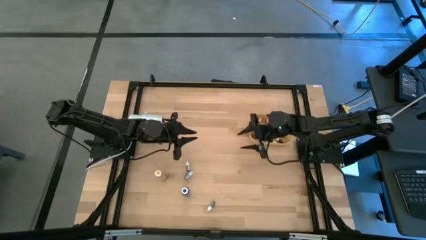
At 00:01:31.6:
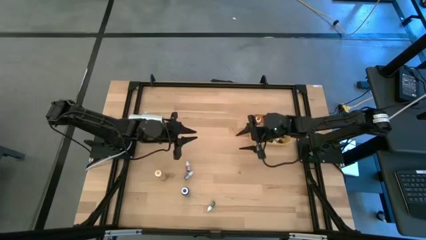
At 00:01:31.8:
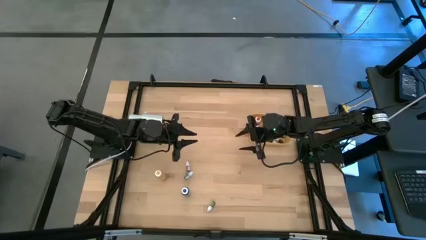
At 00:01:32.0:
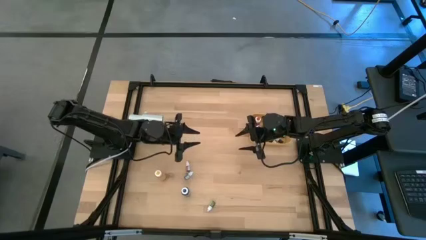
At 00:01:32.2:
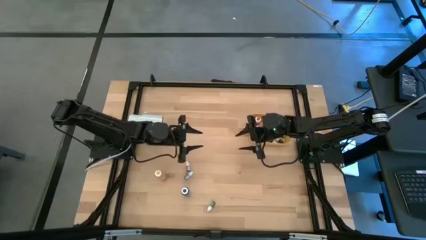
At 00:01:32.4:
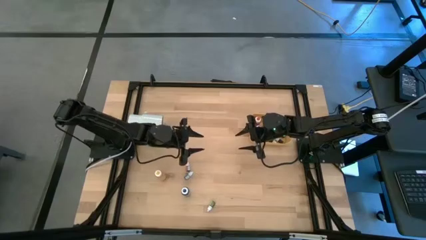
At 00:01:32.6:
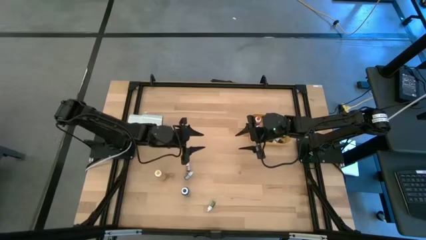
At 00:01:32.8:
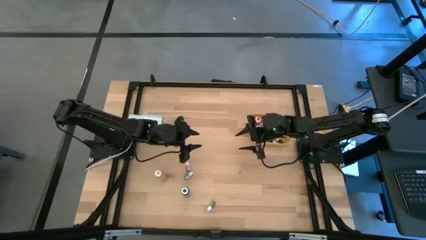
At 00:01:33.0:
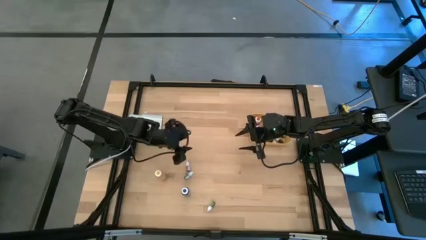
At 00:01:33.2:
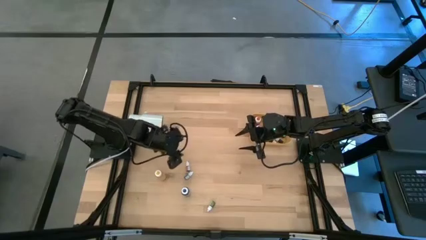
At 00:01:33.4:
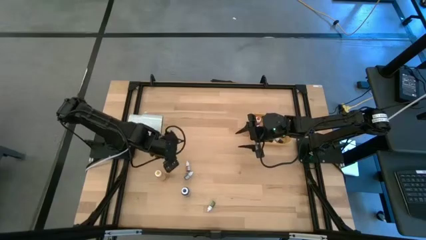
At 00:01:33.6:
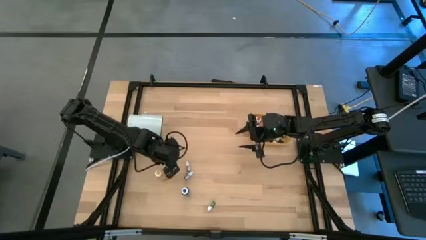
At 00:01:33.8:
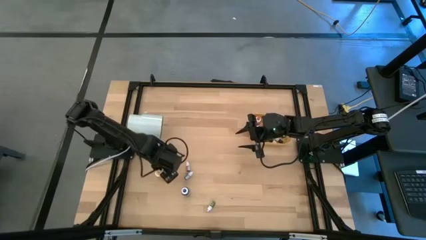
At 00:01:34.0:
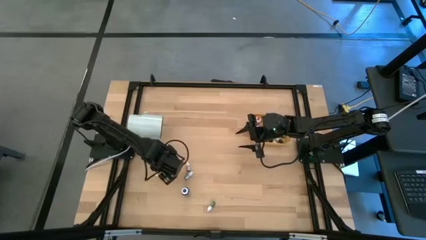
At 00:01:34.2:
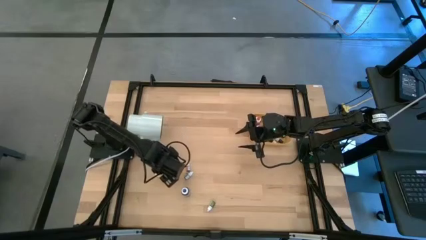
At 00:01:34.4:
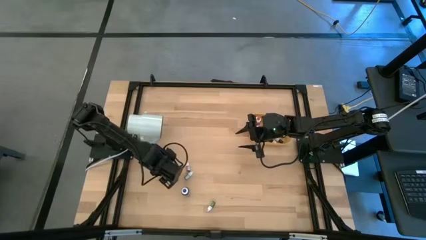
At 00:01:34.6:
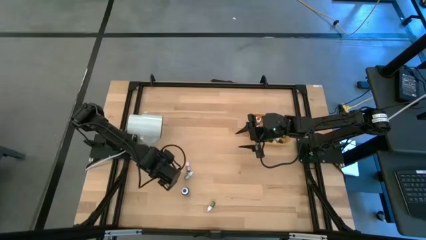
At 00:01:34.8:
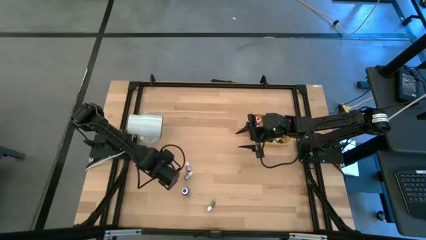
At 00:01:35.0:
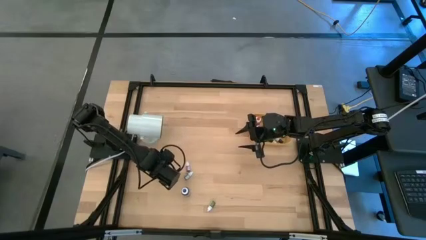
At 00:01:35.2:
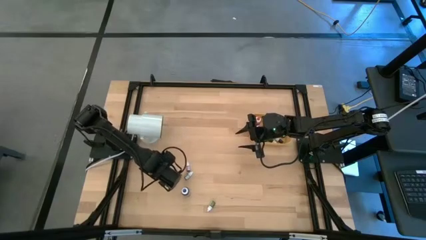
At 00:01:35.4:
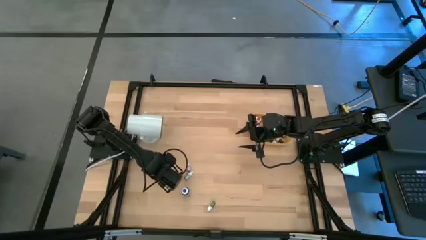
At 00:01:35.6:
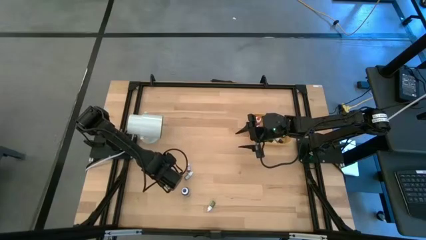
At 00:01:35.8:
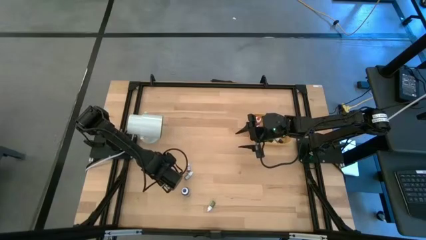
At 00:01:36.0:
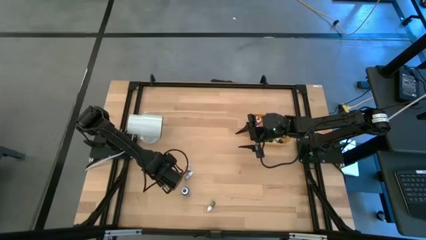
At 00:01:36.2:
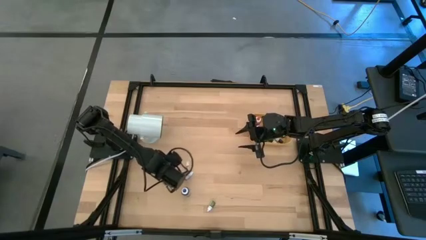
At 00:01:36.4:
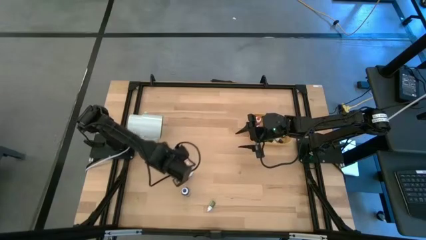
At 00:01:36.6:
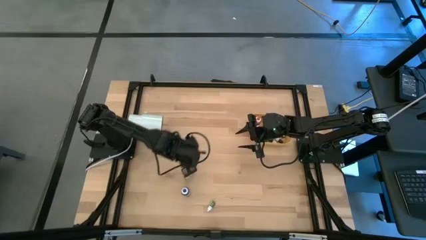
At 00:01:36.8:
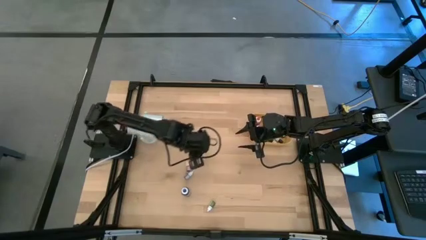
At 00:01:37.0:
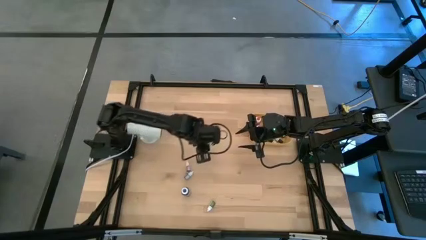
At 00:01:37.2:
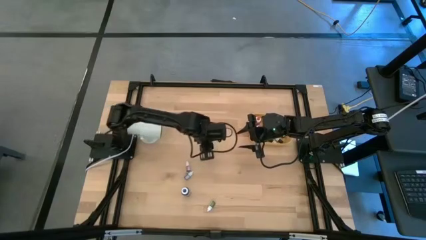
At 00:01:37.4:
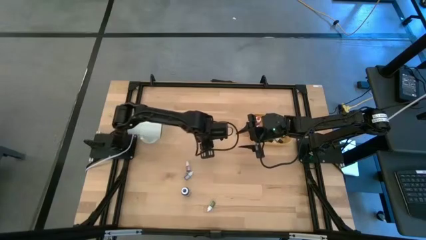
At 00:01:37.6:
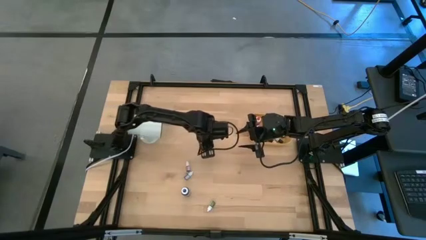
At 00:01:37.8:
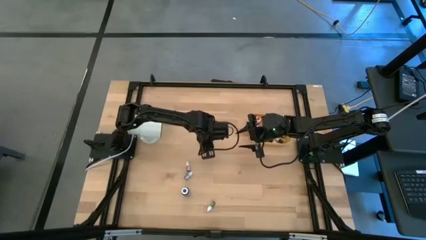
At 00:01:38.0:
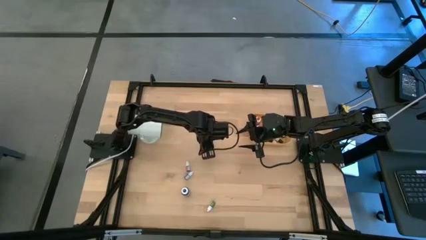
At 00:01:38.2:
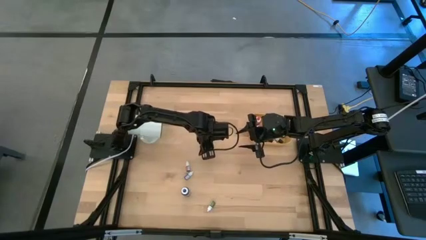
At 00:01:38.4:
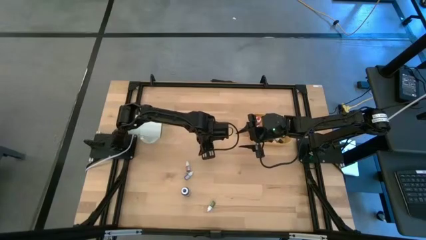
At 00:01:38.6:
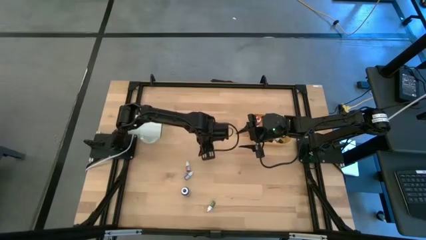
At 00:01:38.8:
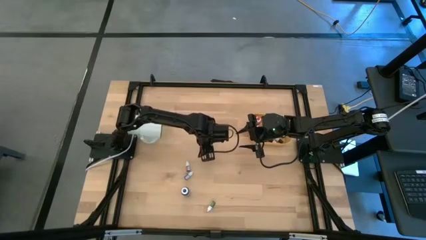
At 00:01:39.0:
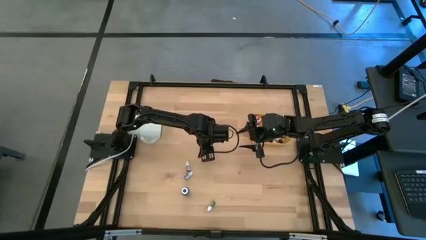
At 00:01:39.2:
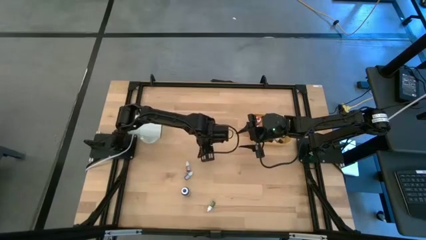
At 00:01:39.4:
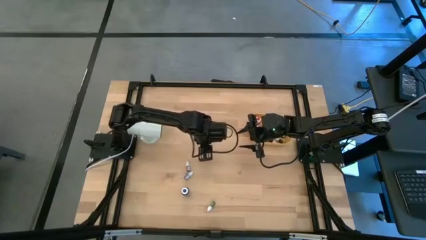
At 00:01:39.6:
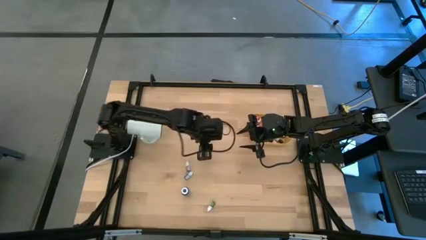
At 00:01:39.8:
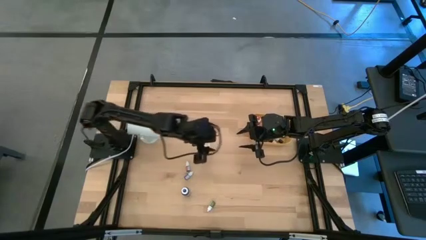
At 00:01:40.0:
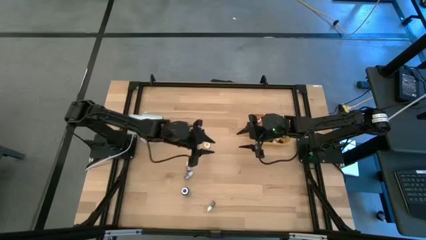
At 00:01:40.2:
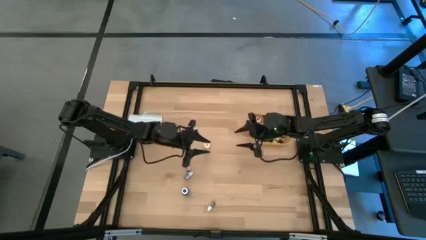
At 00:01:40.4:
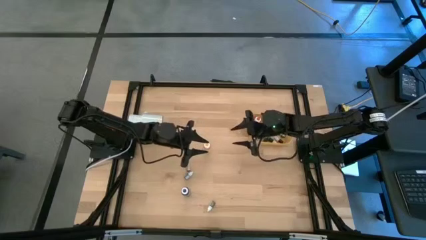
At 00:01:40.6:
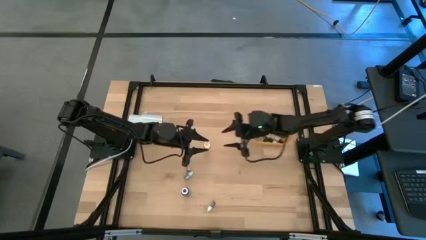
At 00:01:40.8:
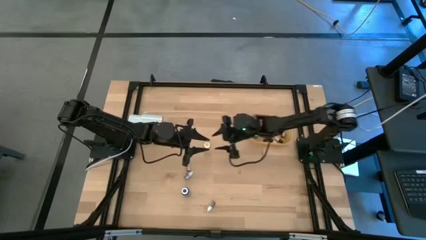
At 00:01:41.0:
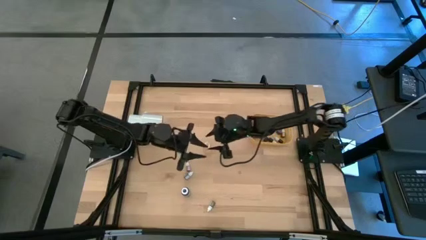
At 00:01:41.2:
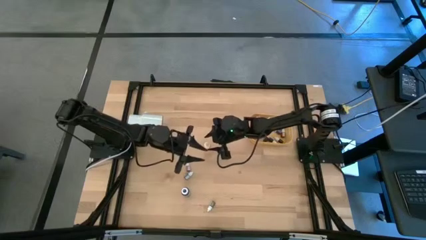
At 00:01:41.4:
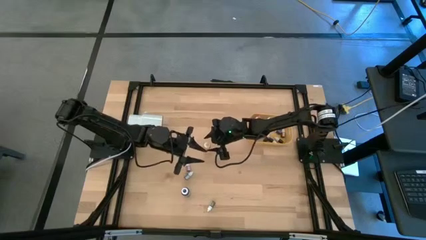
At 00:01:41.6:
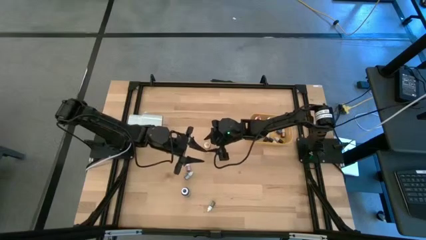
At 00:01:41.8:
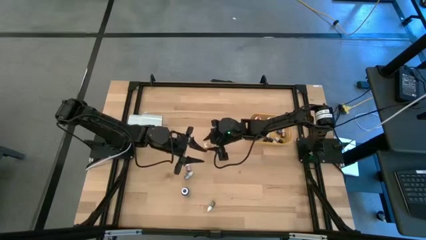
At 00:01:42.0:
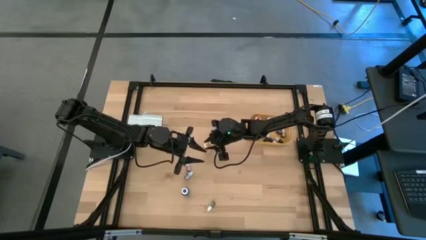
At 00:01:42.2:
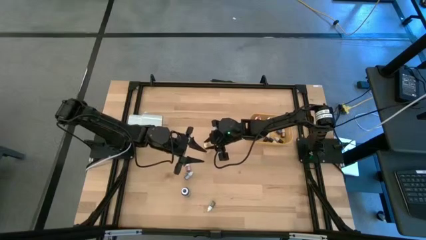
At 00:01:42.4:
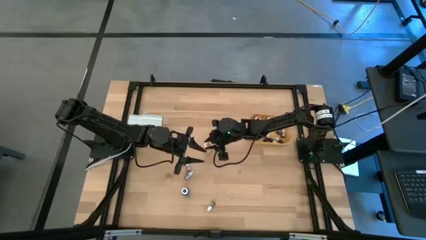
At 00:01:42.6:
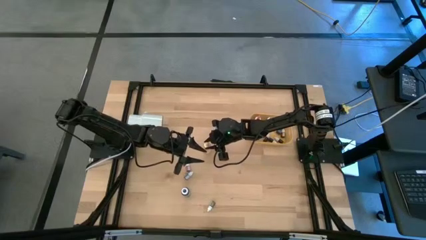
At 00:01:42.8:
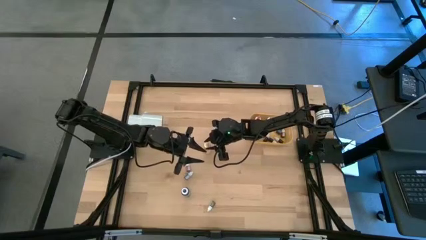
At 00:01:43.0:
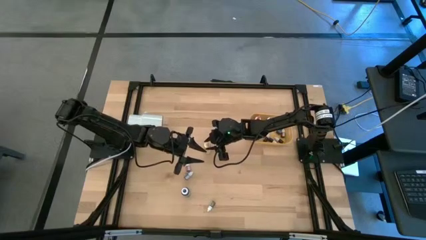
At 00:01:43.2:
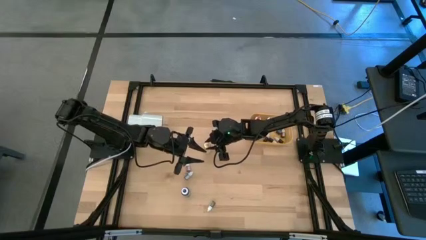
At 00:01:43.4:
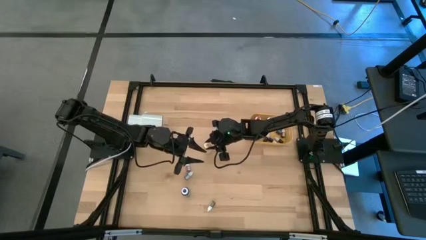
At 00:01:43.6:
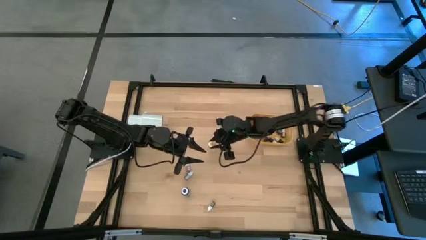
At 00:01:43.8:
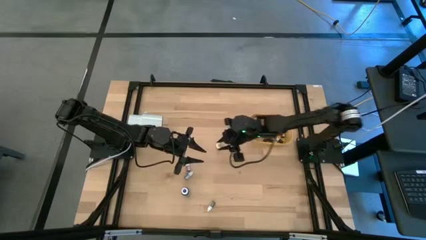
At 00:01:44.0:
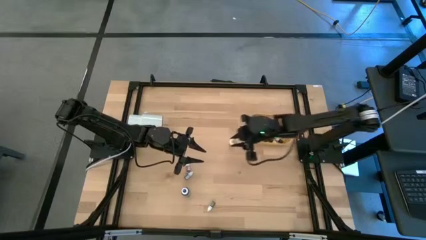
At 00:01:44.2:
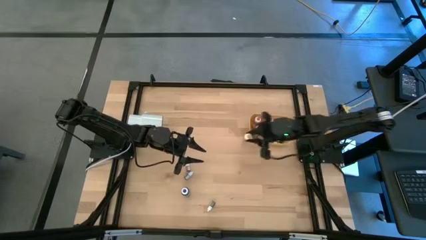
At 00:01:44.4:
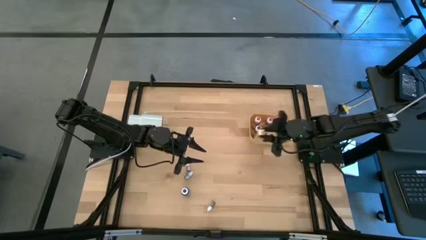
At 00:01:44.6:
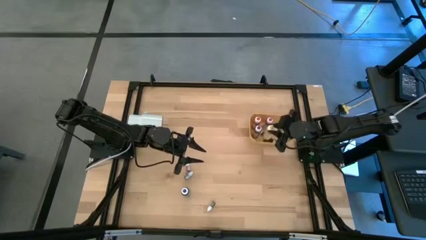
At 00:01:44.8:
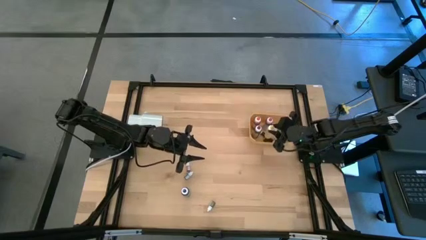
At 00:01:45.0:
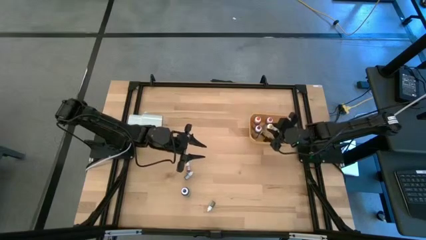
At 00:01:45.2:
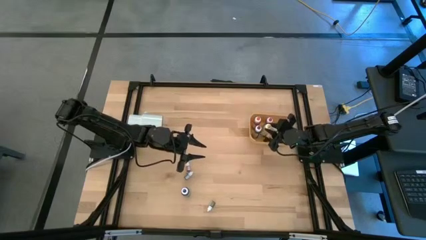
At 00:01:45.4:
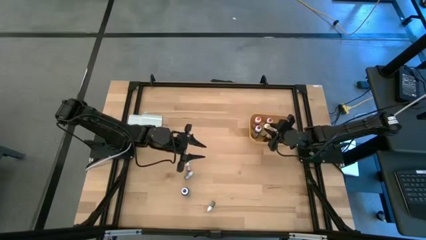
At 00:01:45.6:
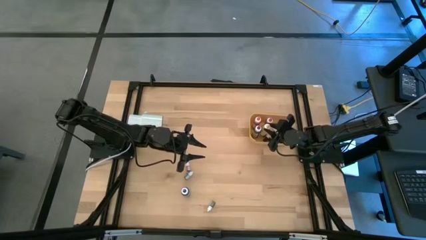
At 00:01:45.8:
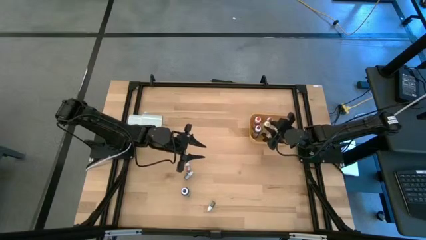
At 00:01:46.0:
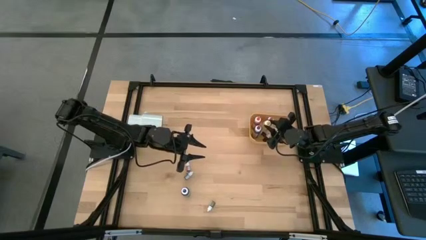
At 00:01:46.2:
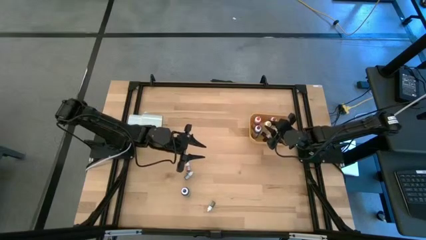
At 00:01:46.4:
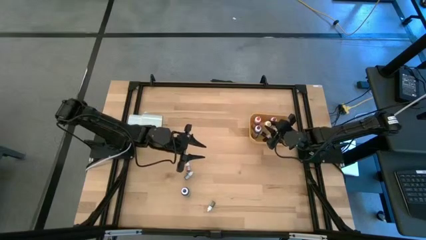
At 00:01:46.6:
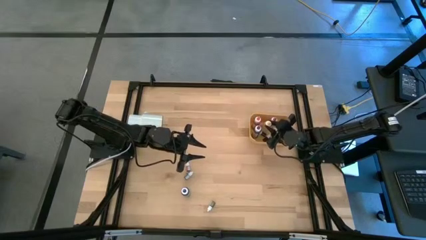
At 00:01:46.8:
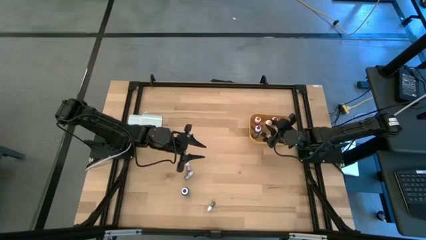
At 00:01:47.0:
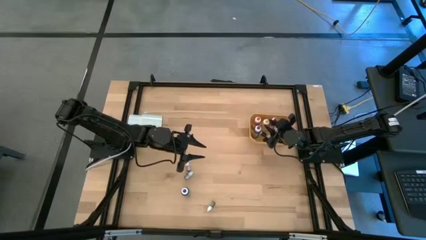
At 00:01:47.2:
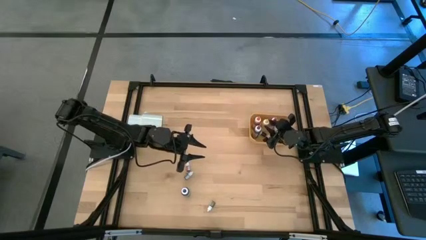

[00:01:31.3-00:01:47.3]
Task: Pick & Place food coloring
Put the yellow food coloring into the yellow bin
